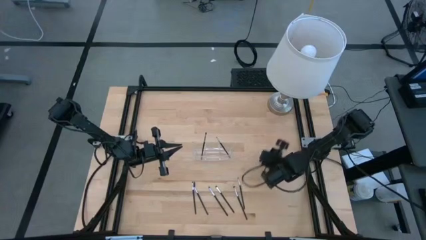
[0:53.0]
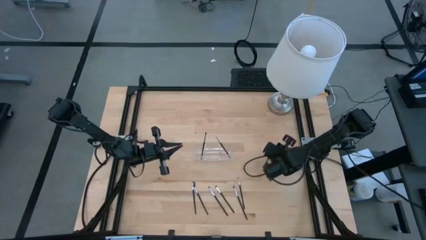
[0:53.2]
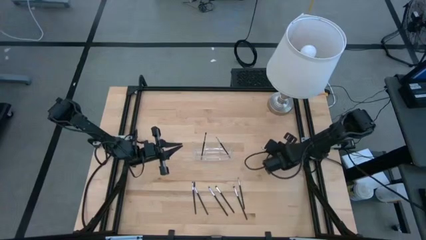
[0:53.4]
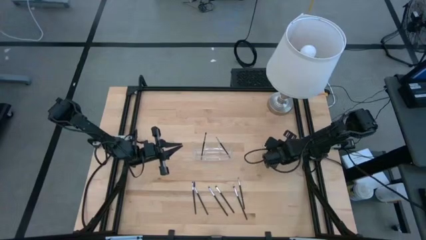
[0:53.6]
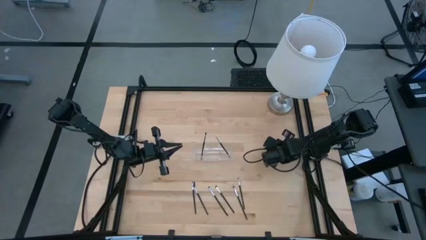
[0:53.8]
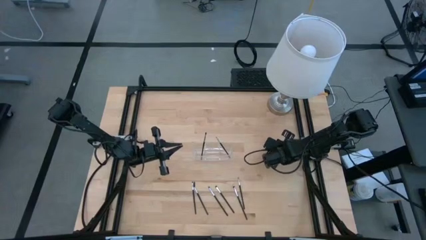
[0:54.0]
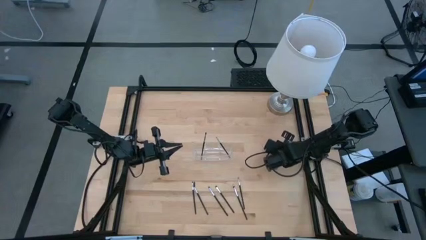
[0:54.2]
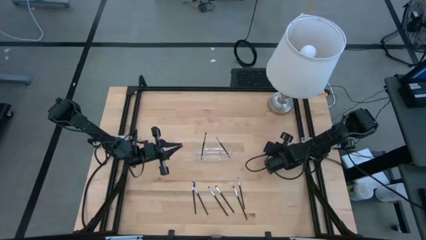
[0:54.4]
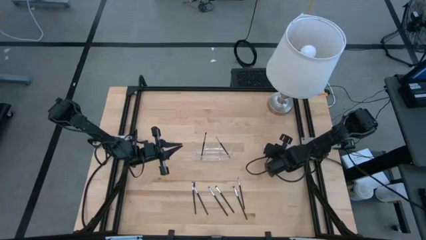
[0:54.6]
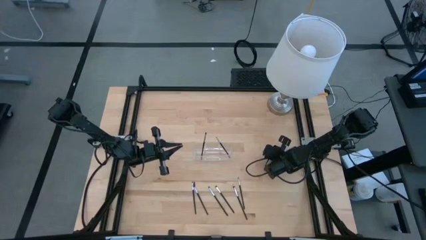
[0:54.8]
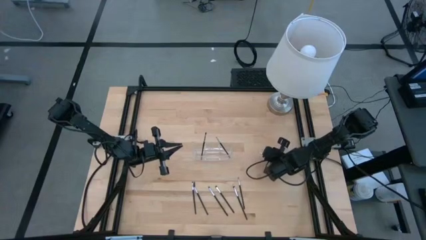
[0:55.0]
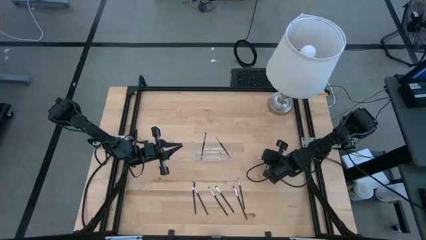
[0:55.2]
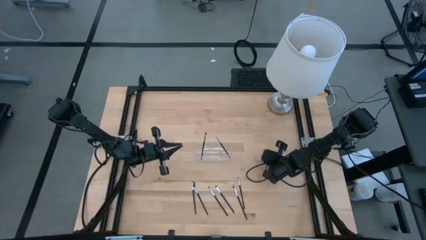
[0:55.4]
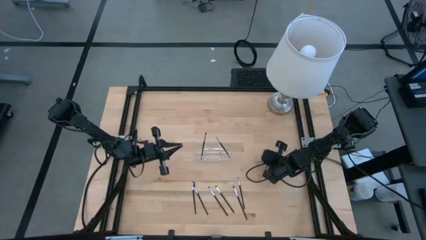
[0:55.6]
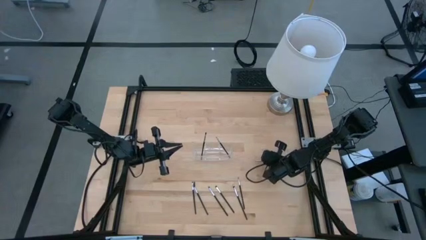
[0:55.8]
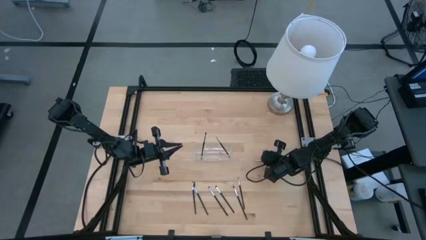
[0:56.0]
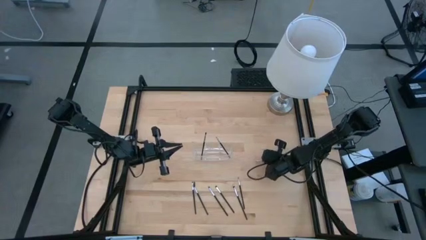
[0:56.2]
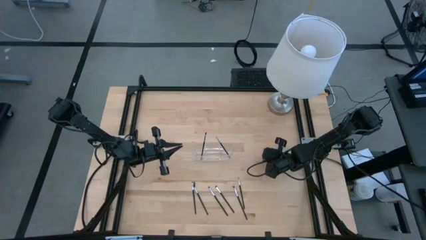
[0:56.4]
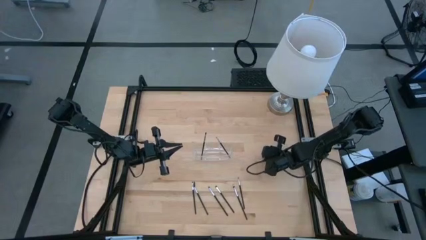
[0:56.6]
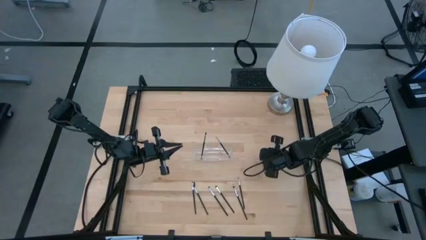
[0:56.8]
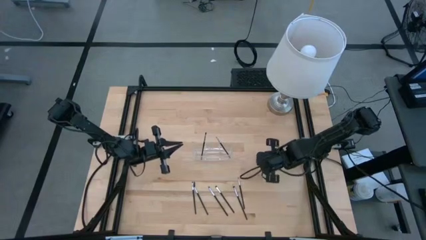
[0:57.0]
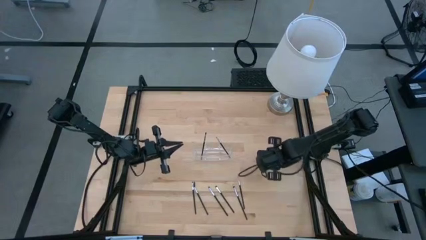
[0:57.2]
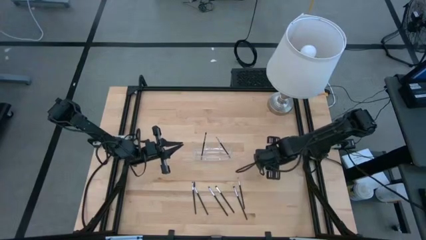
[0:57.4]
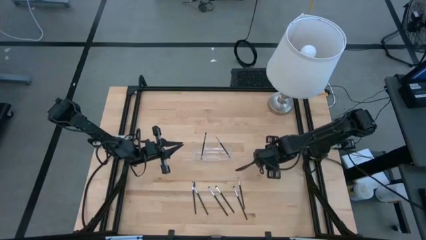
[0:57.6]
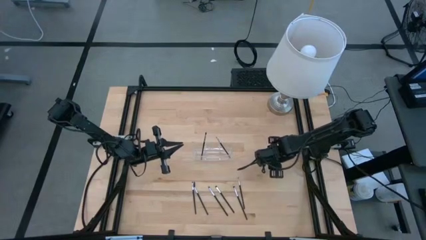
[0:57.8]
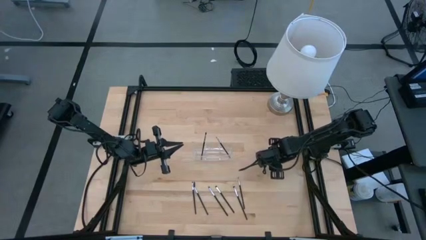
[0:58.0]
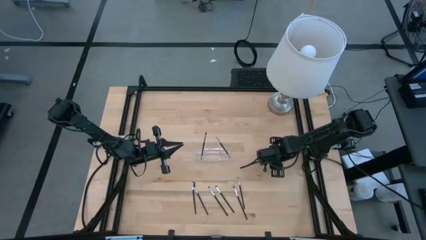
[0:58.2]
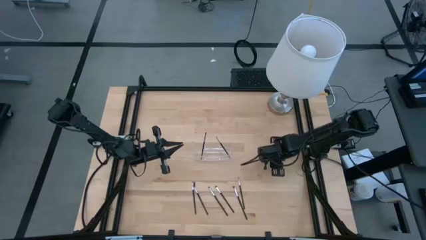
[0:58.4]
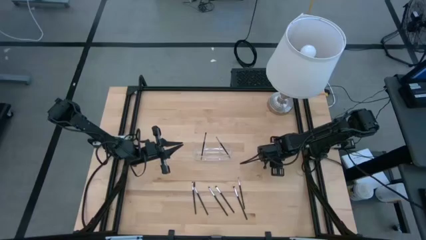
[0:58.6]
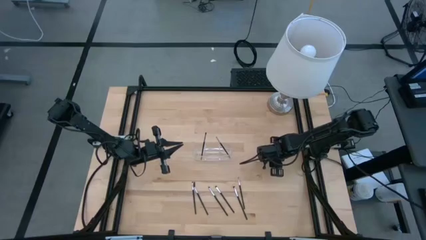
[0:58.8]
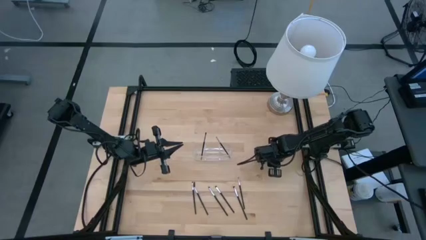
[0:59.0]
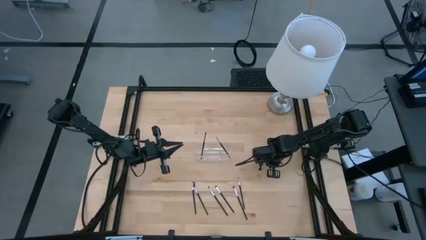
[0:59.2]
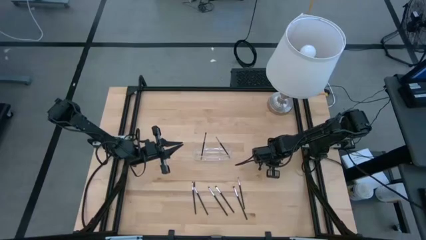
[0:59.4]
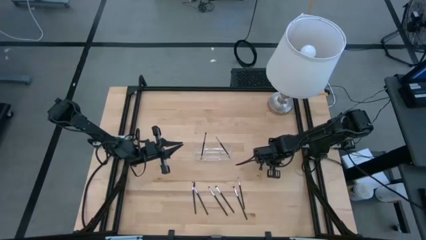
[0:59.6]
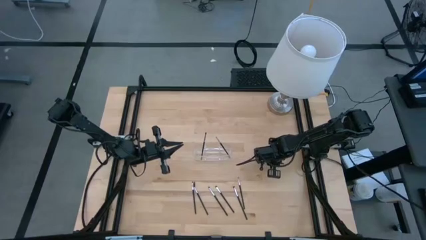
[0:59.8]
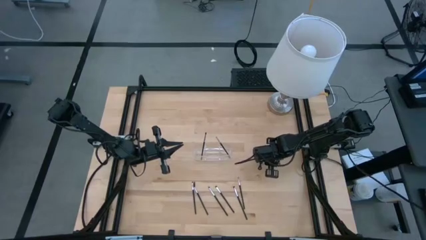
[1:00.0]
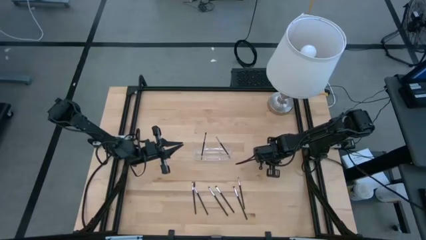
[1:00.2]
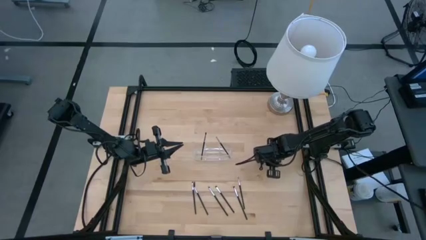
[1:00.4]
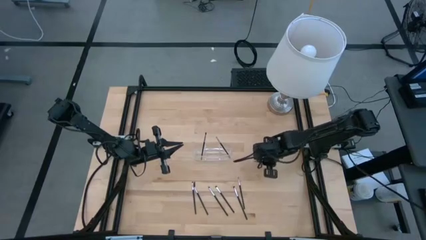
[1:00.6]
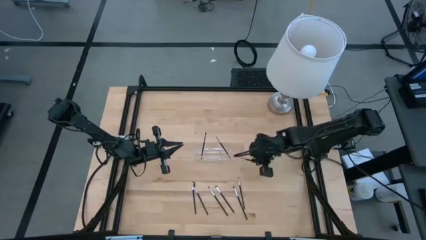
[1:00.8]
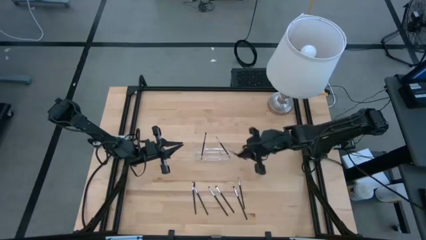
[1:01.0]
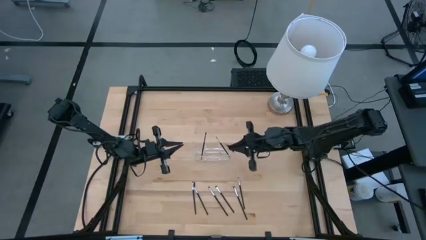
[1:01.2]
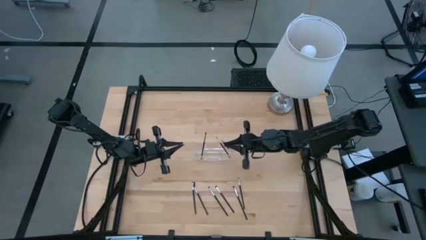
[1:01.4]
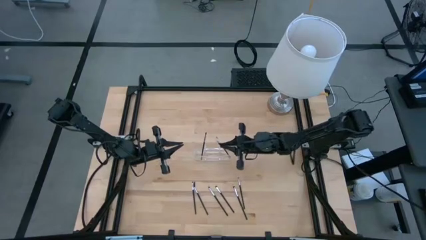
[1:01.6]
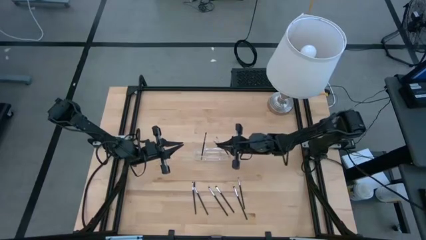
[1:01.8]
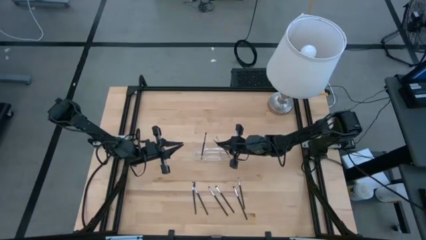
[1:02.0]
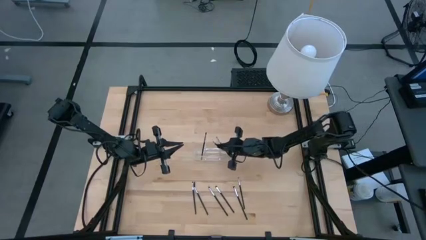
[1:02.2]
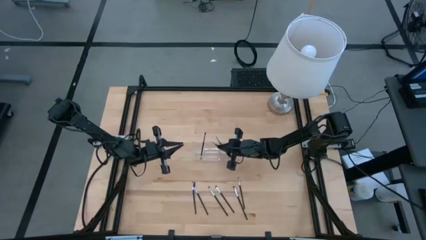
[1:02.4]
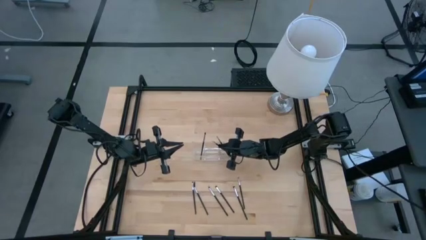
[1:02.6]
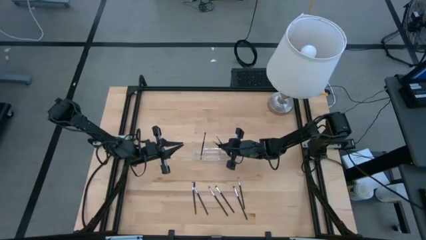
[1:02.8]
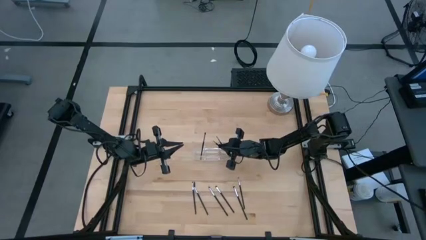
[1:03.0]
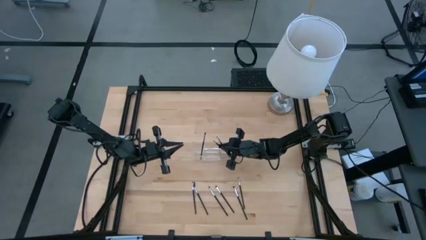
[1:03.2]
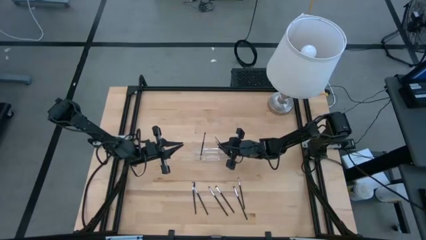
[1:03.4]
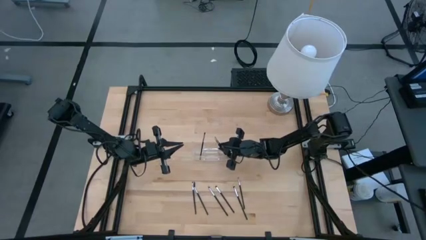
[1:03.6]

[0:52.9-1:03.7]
Task: Put items in baskets/containers
Put the liner brush in the transparent organizer

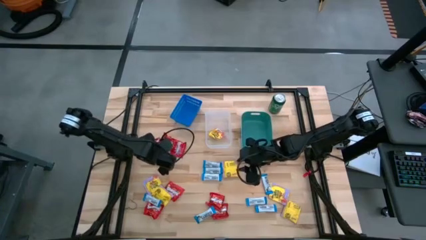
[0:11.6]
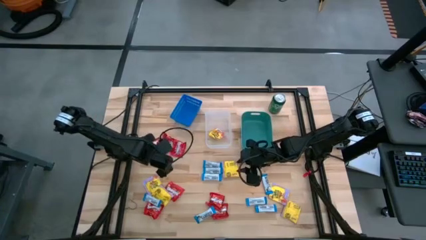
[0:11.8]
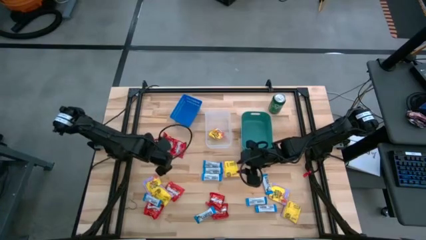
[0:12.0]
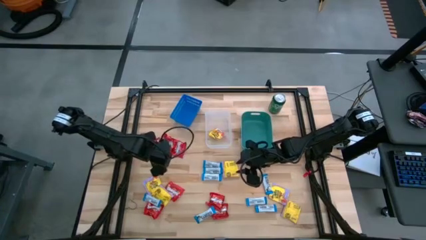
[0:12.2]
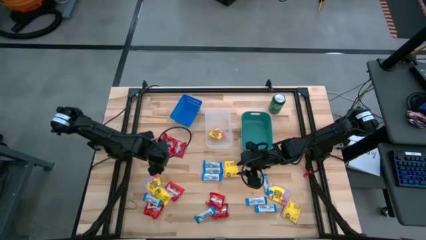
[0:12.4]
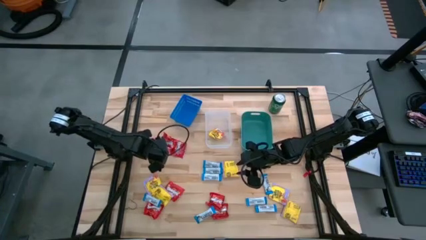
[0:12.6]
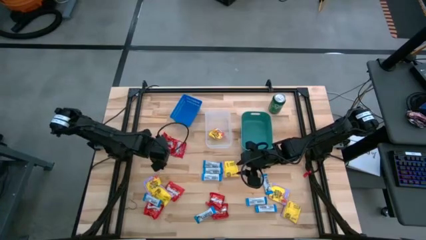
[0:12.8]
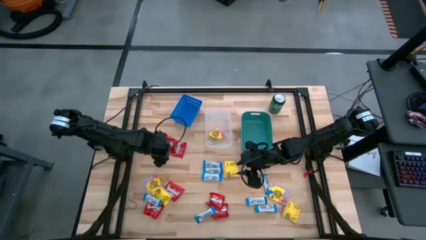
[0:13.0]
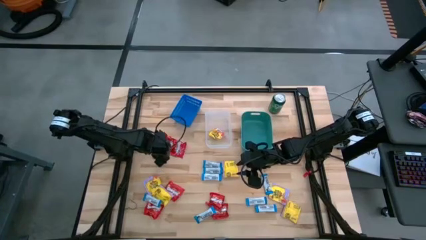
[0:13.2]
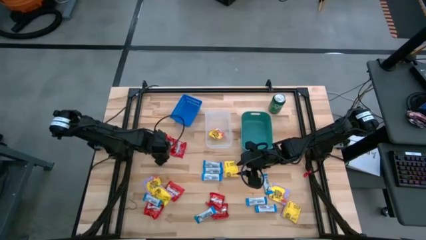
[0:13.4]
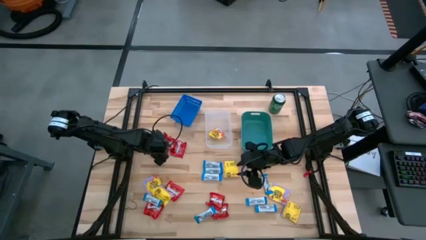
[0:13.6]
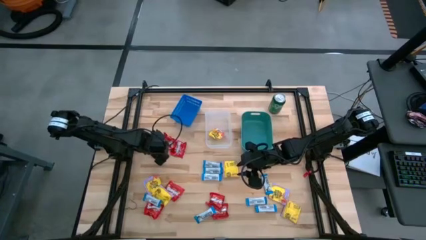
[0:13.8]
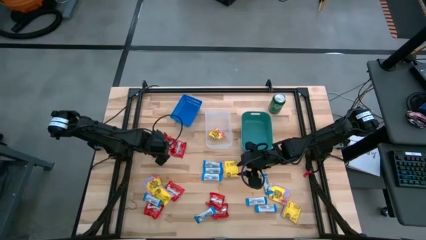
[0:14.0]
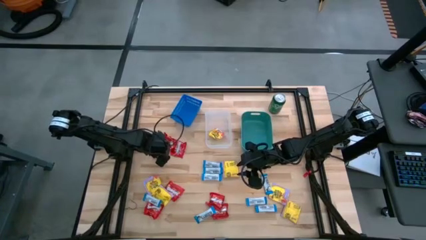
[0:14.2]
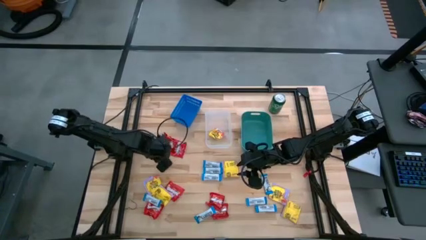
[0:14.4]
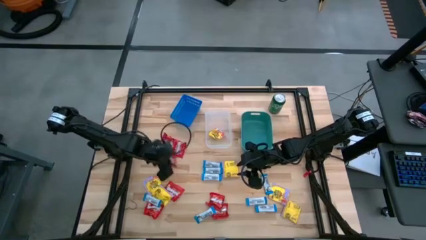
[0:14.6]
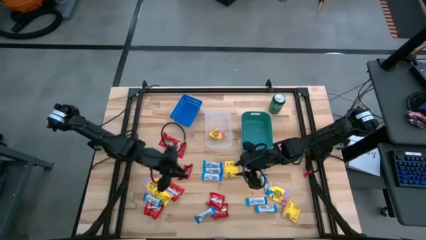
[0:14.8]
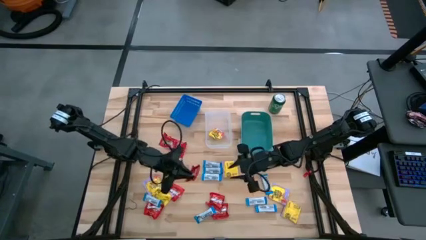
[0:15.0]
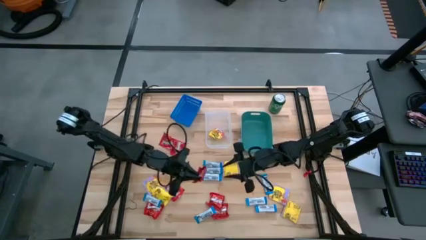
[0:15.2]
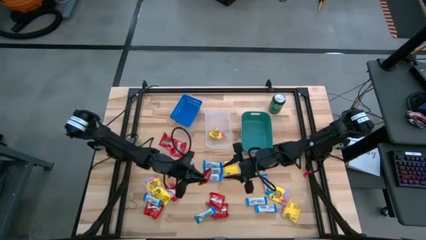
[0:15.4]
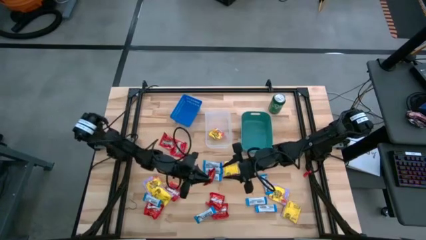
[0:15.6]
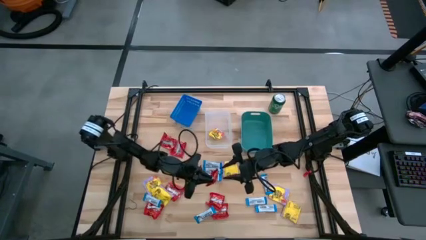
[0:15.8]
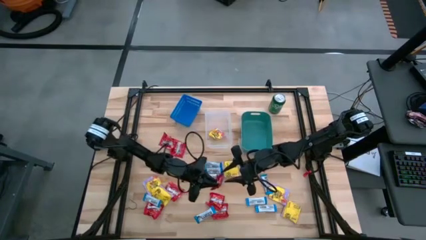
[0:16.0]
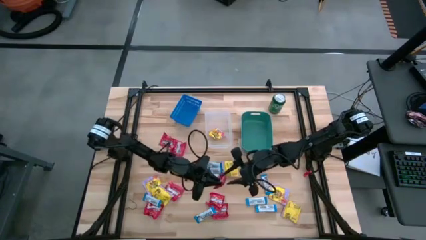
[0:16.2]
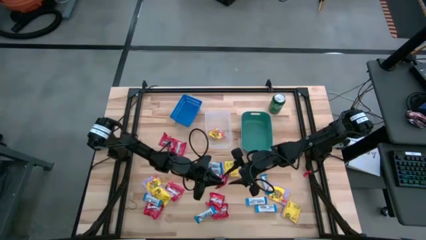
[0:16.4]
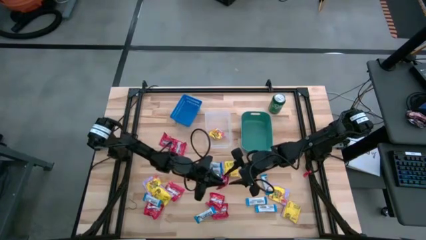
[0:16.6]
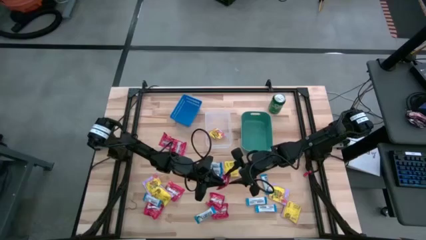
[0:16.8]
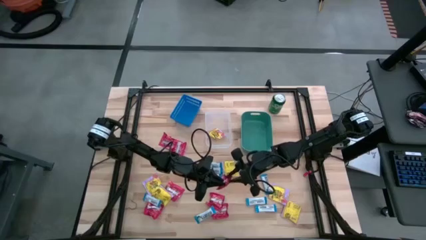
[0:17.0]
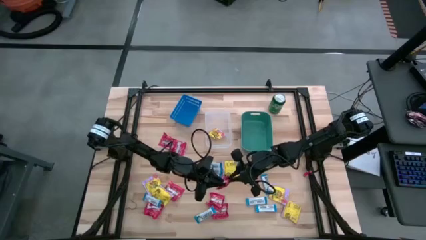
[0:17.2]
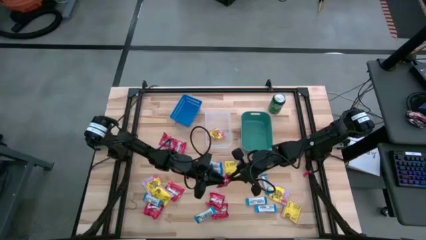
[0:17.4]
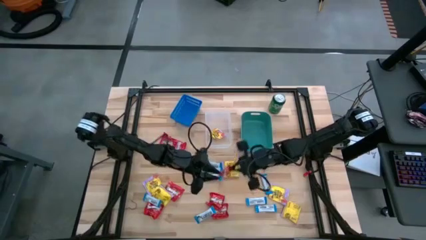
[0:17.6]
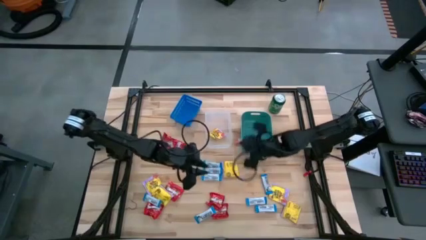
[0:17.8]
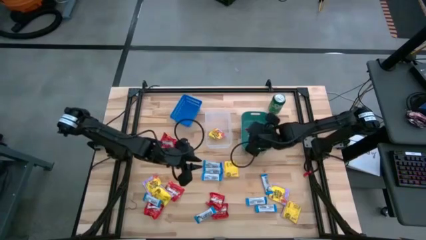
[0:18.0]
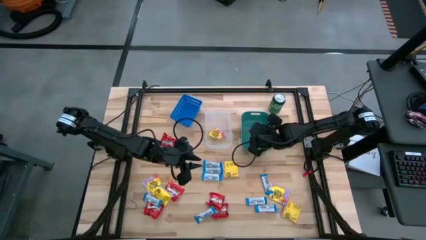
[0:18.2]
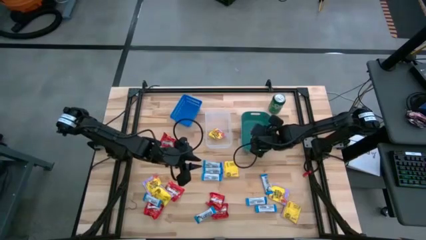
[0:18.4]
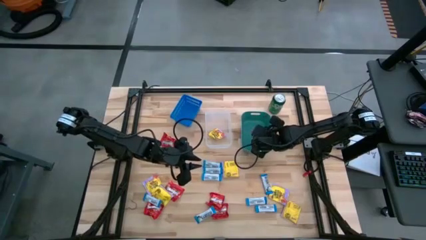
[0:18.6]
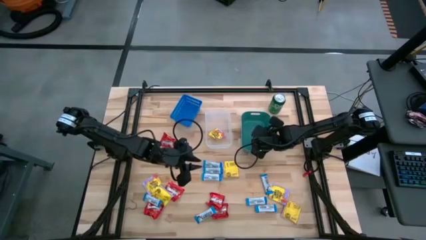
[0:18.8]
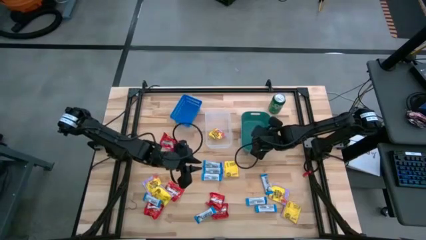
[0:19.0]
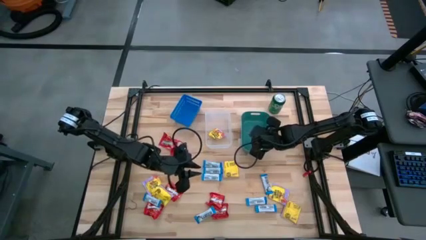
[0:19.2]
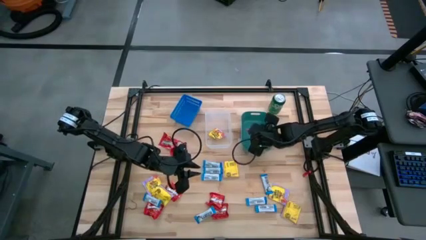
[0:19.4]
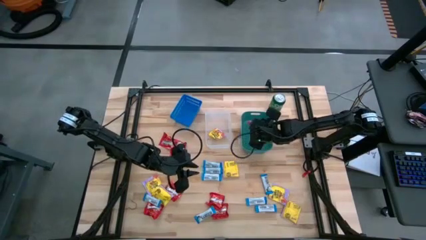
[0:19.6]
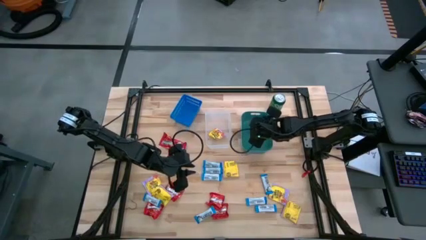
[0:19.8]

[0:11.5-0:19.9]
Task: Sort candy
Put the red candy into the green bin
